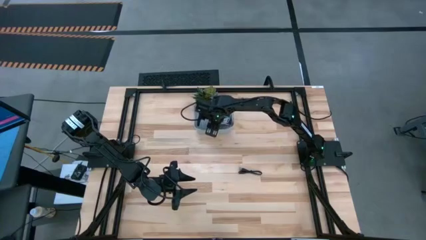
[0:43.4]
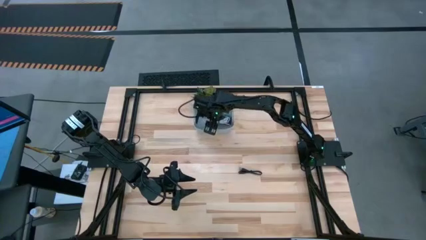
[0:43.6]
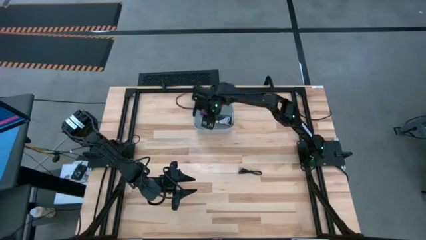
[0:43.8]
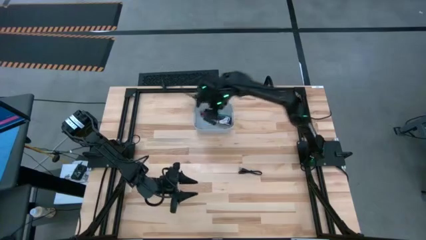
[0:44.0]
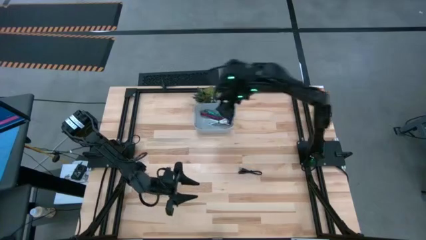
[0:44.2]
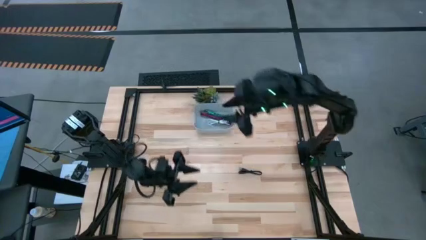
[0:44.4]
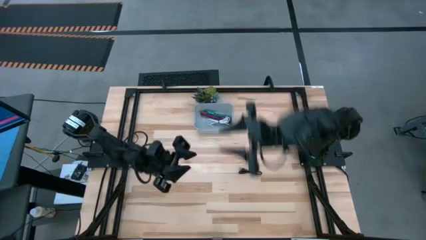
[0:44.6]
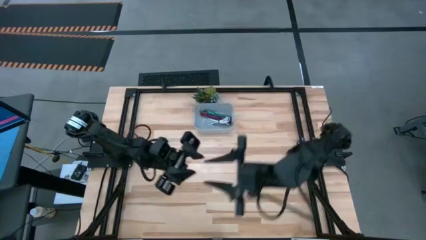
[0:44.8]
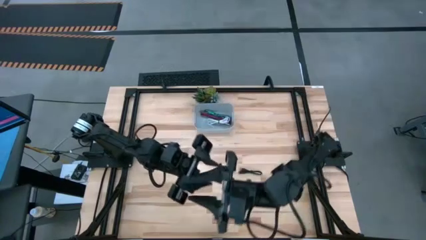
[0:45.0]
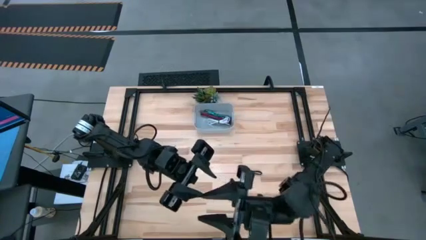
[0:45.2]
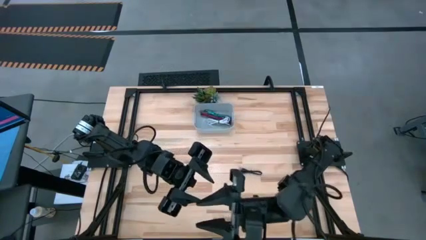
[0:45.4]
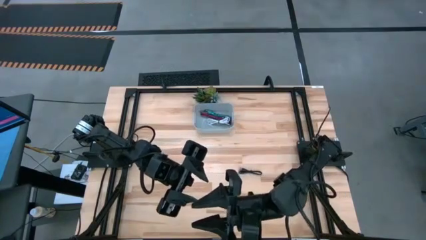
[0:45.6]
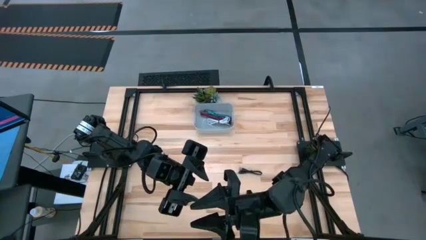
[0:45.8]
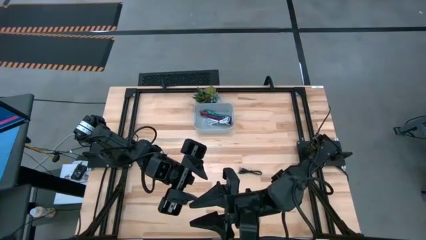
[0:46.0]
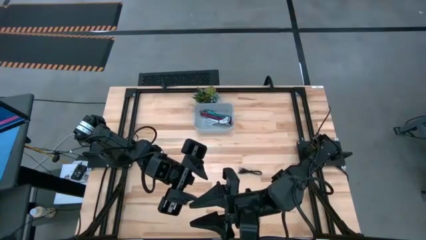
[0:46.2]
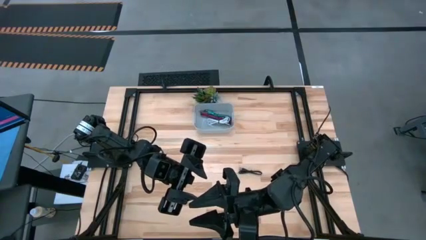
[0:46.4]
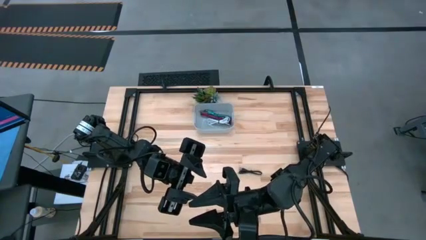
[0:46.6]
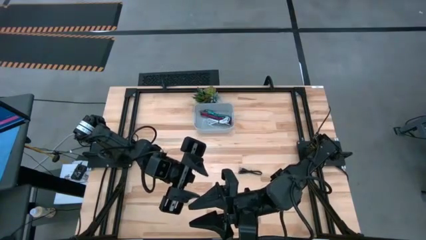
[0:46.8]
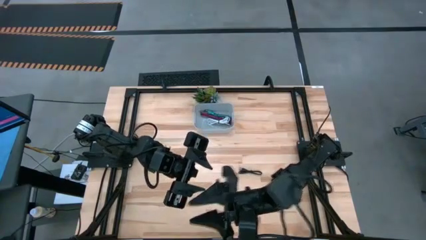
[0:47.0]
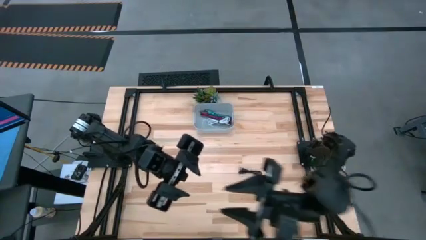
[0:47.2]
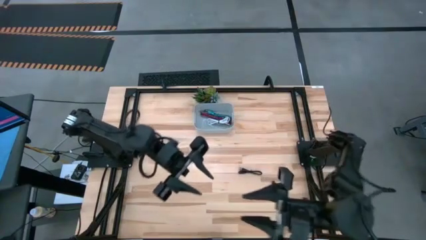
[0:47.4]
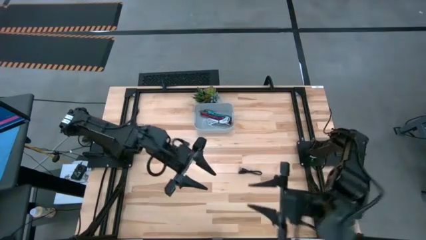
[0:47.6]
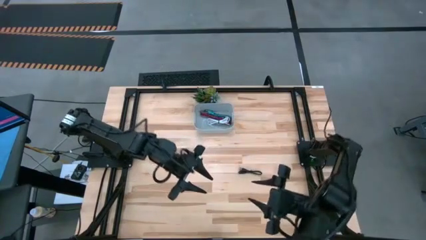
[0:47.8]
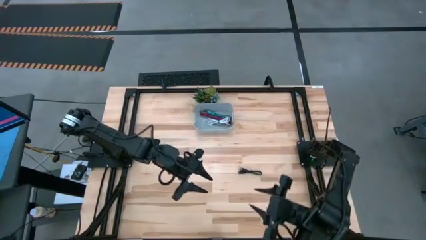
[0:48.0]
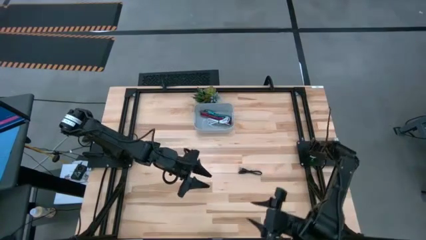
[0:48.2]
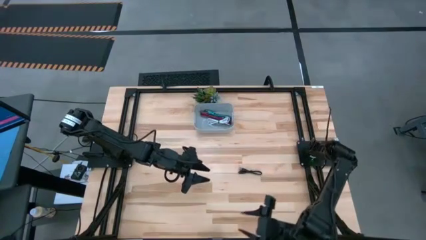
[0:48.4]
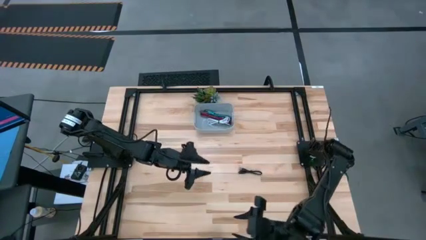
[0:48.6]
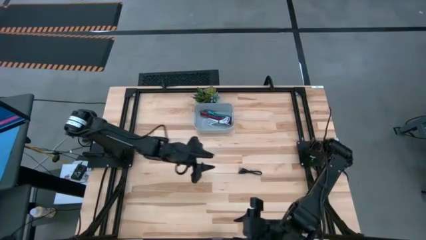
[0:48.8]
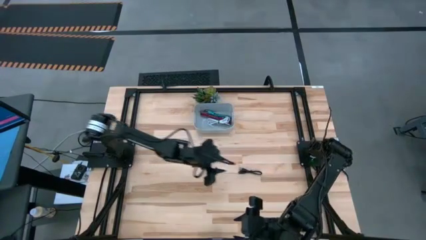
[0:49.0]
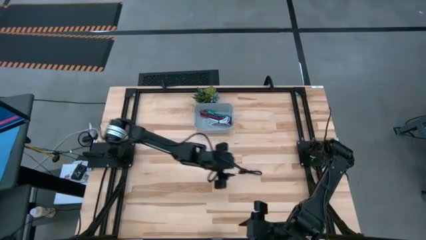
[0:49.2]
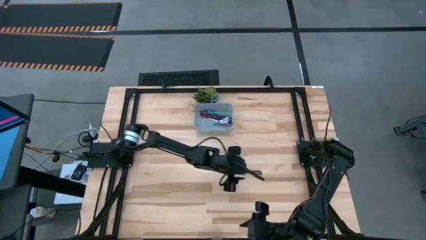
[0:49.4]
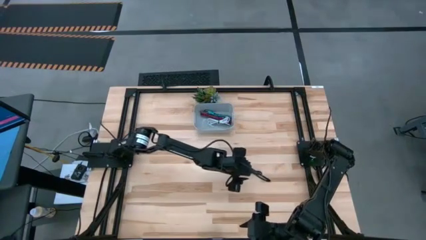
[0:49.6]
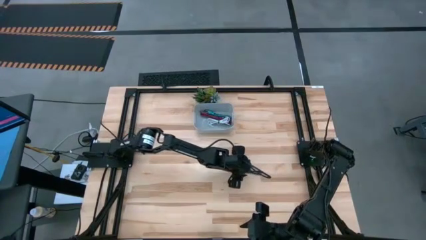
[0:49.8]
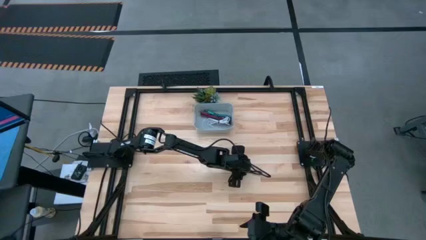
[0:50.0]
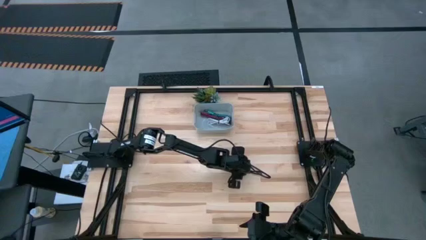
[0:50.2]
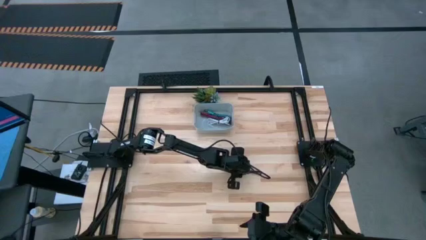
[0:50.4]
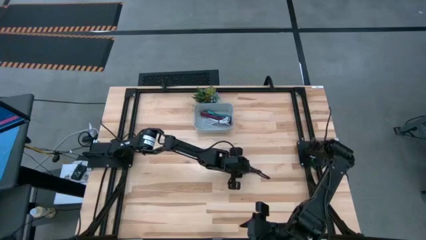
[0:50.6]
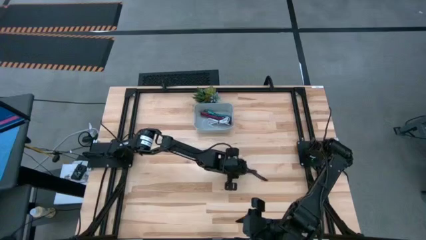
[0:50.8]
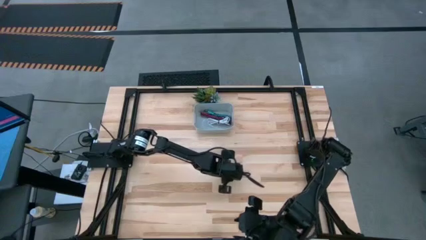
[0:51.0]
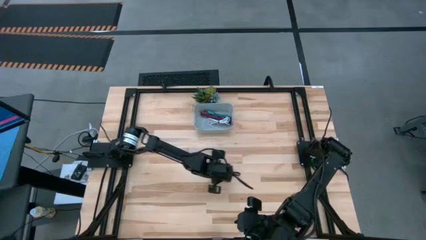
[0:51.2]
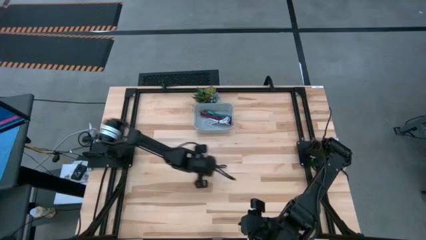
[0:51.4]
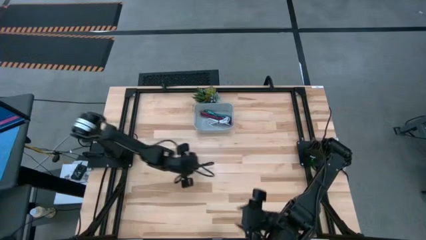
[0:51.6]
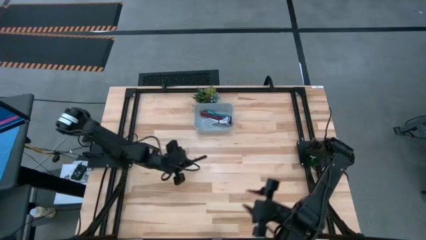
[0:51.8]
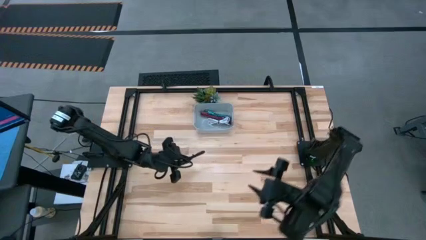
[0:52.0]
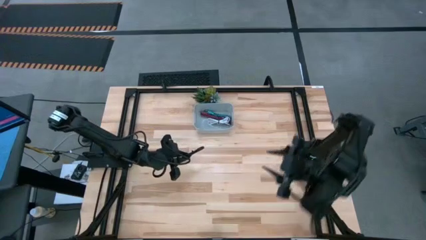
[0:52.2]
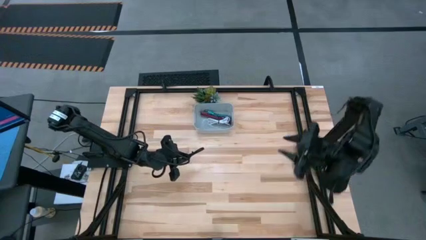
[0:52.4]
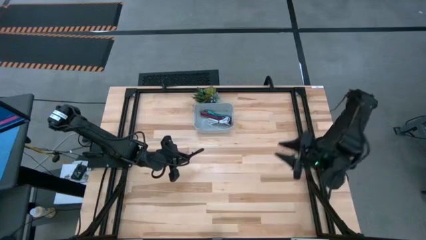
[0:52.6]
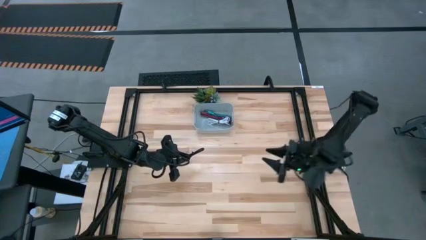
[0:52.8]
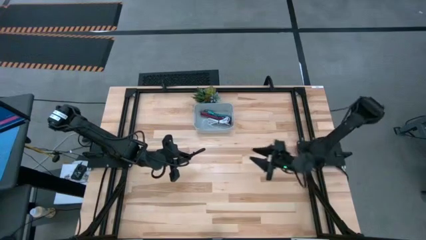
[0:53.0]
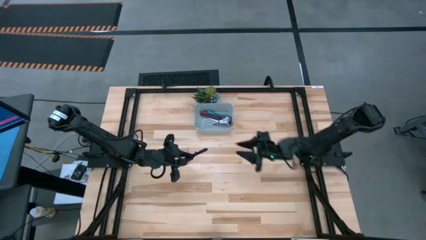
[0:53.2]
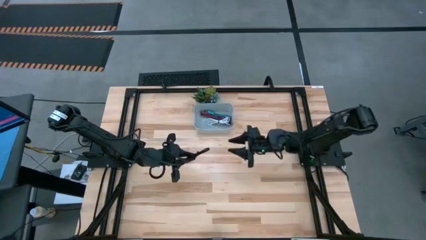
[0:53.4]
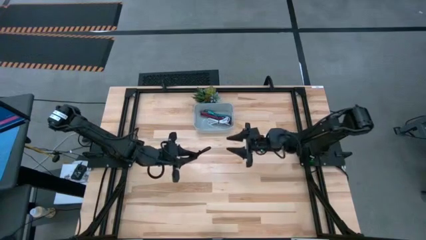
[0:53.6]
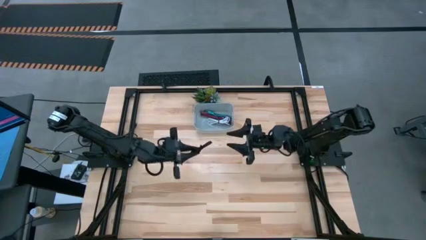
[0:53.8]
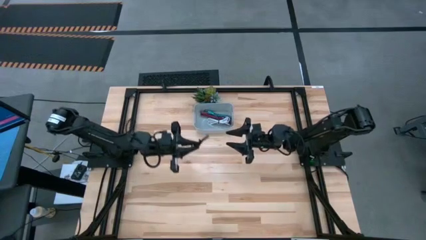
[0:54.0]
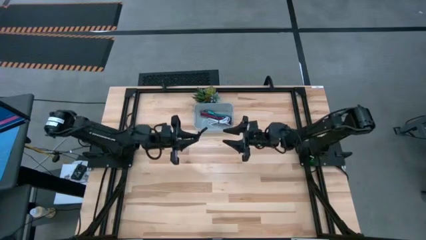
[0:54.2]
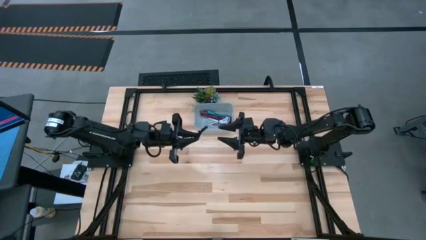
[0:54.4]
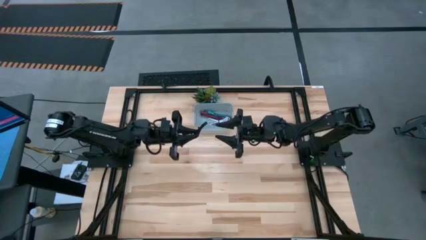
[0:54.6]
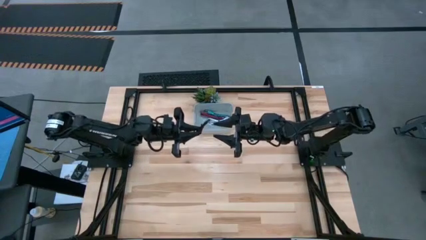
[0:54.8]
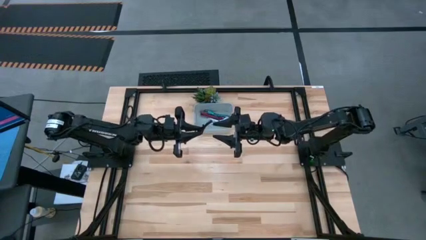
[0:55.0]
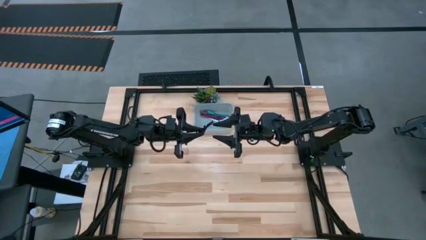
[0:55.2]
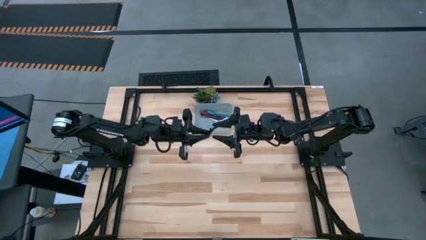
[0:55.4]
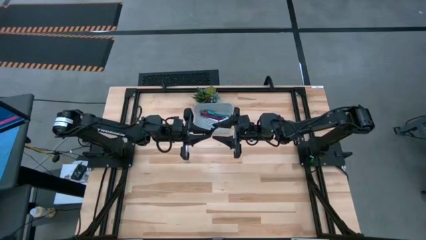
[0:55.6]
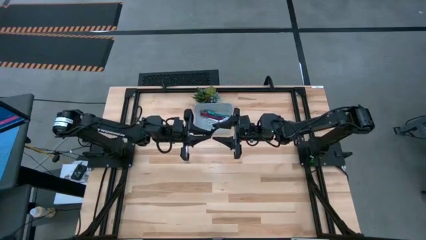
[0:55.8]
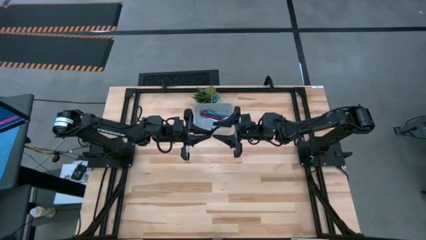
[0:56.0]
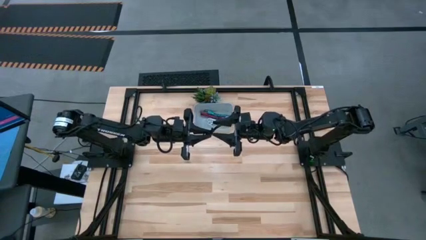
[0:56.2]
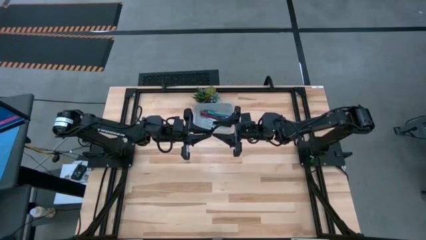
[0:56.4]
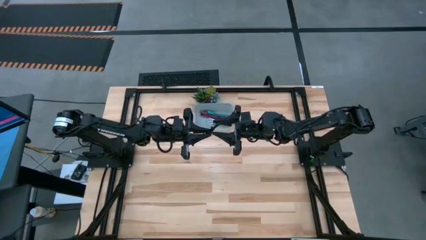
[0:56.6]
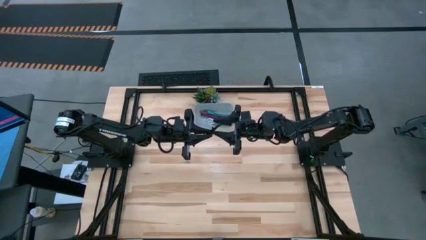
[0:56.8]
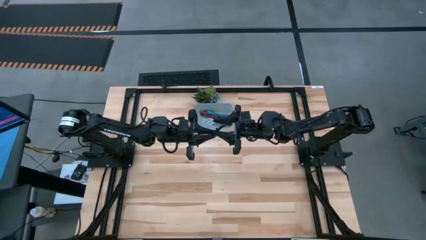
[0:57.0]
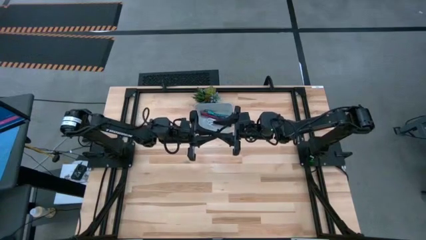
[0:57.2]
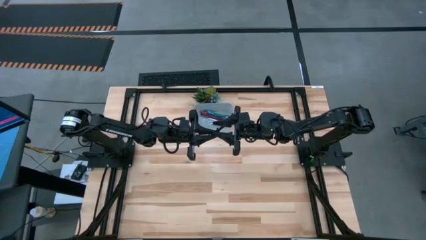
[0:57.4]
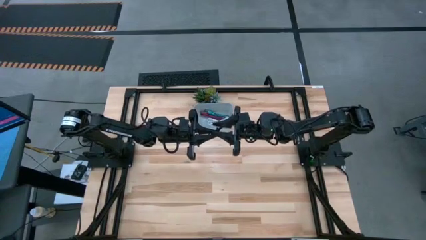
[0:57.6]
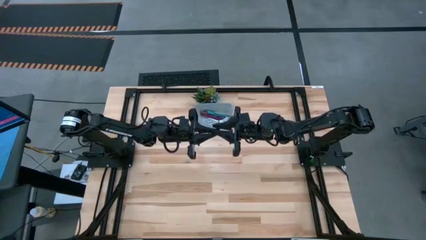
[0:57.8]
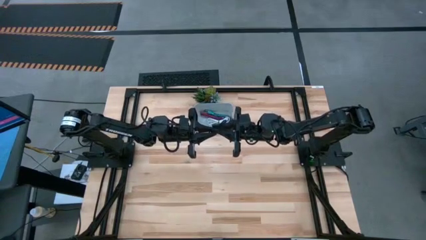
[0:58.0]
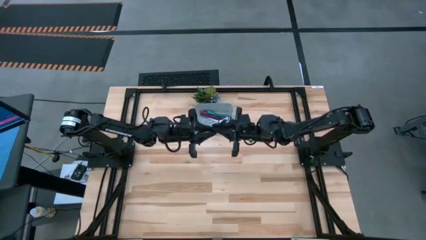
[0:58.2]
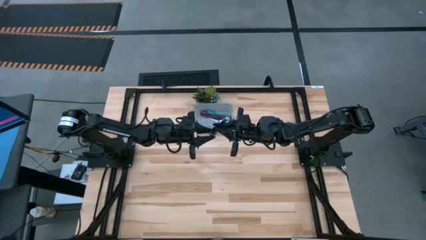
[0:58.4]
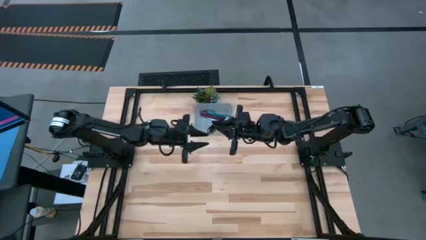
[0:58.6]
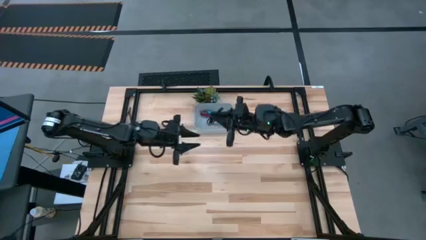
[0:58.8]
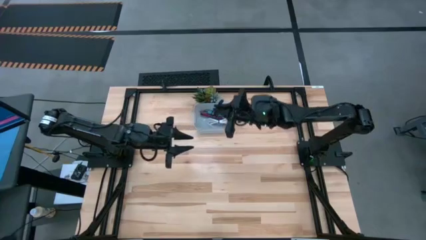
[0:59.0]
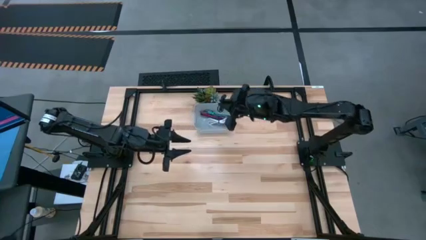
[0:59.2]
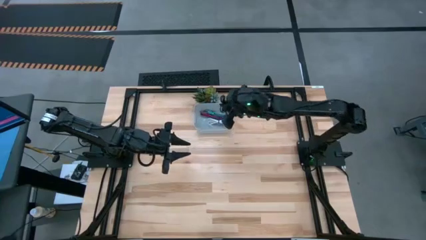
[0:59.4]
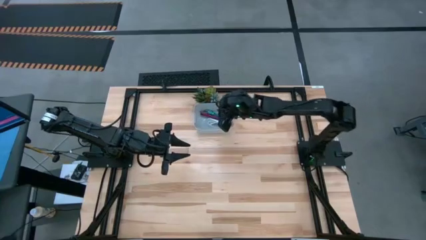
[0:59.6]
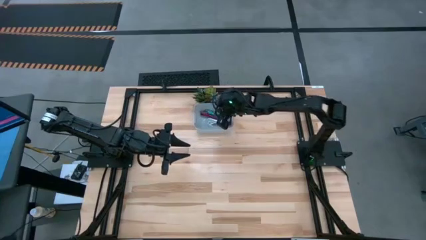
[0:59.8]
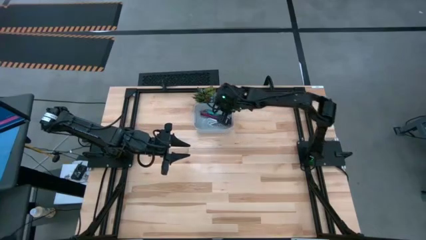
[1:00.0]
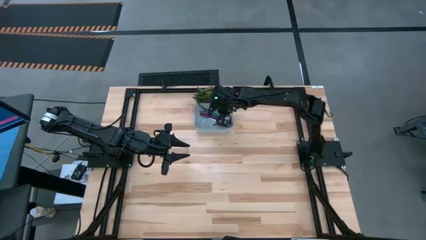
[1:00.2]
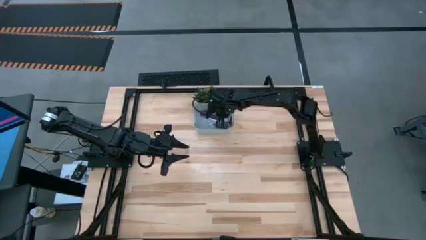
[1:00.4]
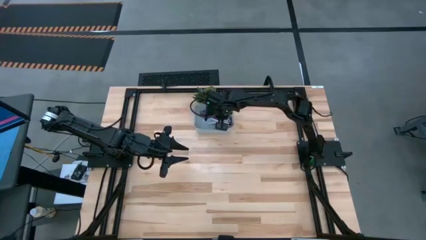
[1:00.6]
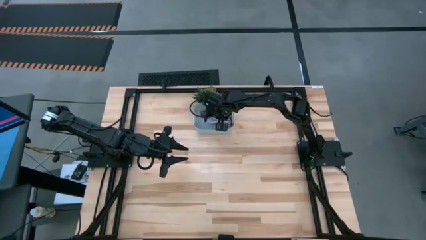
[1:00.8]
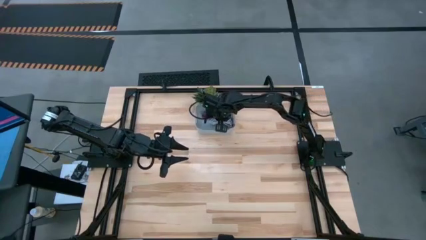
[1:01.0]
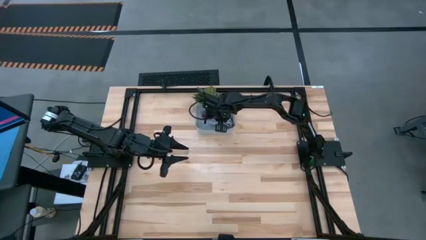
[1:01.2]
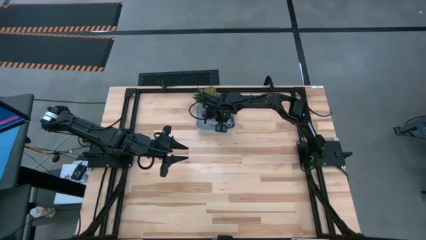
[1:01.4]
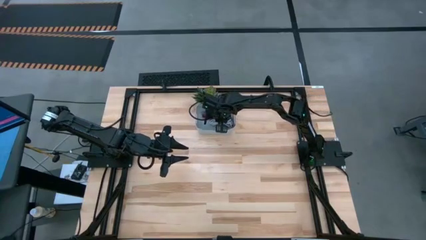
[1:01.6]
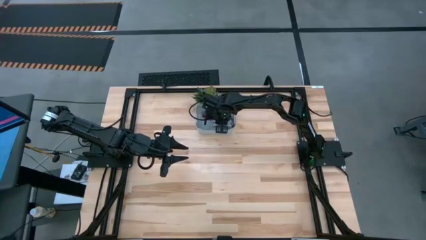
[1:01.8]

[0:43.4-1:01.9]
Task: Pick and place USB-C Cables
Put the black charger cable into the gray bin
